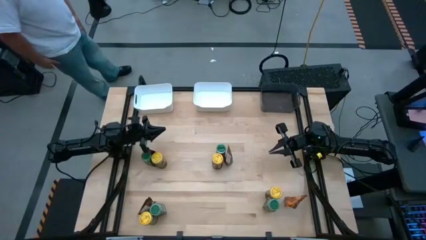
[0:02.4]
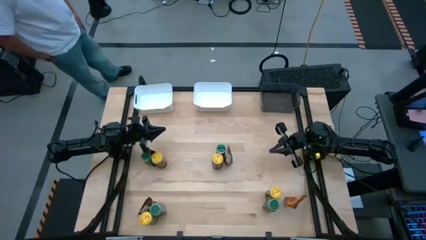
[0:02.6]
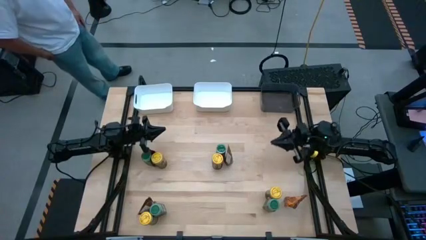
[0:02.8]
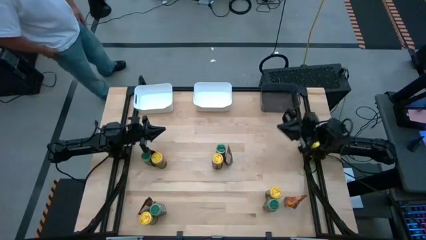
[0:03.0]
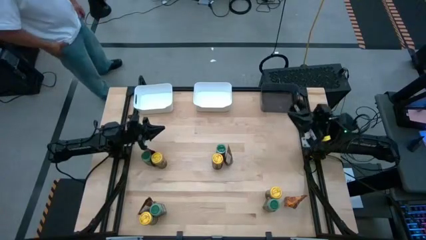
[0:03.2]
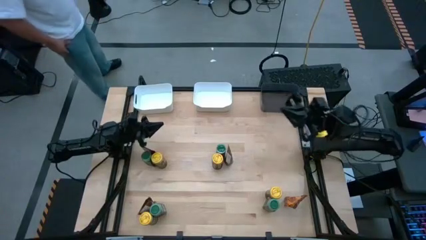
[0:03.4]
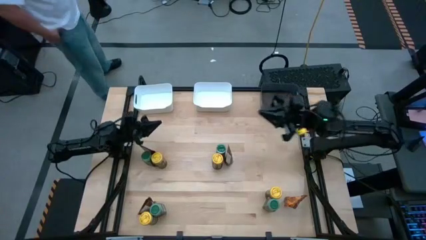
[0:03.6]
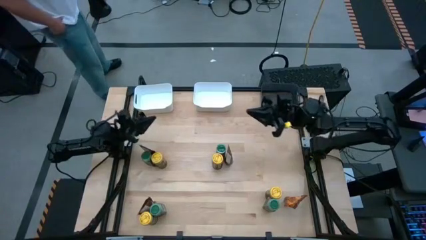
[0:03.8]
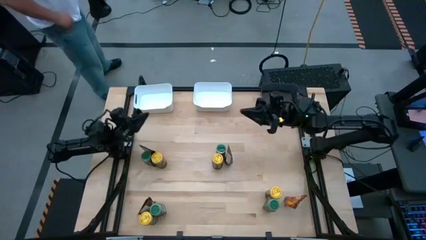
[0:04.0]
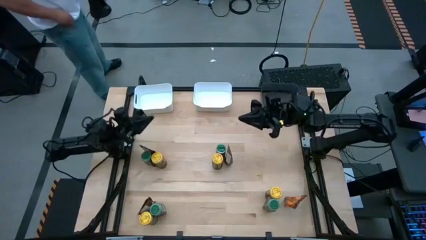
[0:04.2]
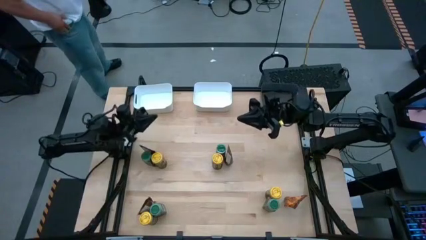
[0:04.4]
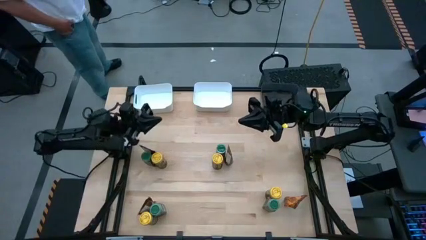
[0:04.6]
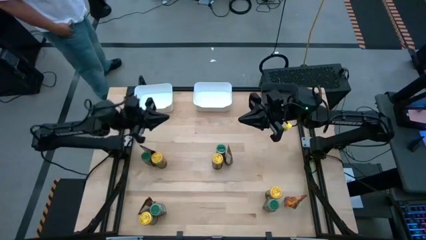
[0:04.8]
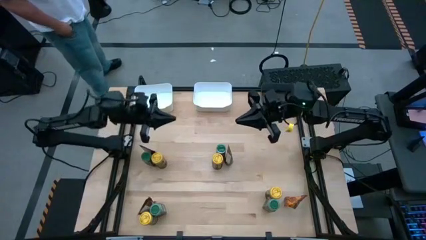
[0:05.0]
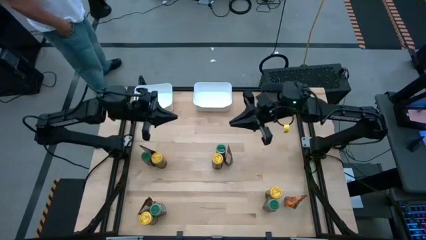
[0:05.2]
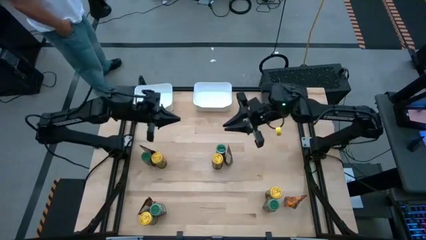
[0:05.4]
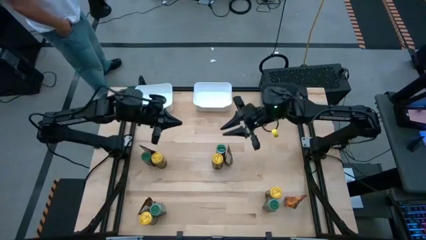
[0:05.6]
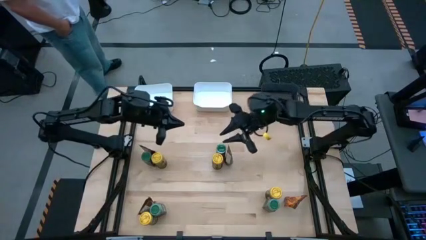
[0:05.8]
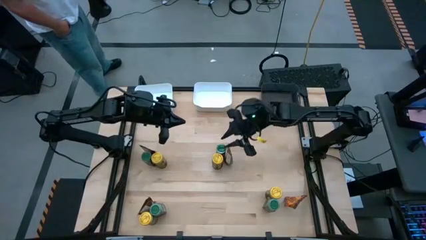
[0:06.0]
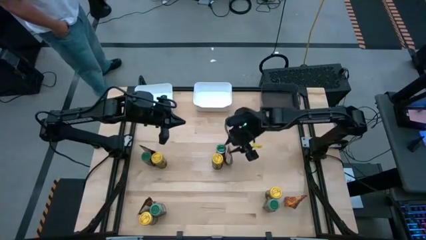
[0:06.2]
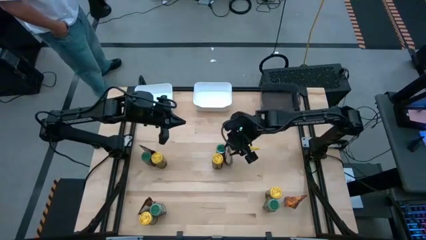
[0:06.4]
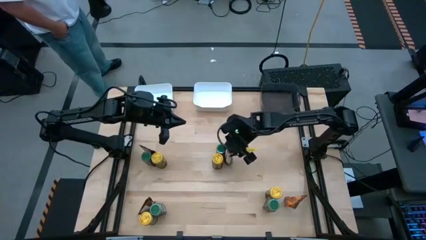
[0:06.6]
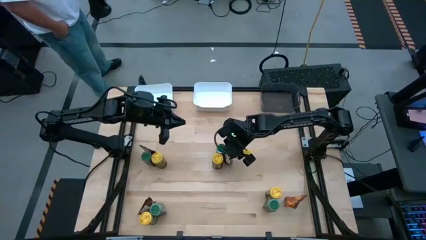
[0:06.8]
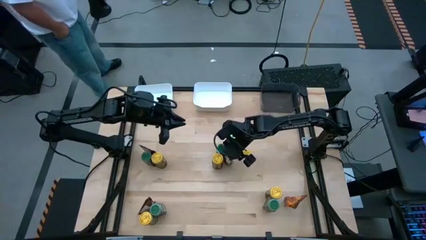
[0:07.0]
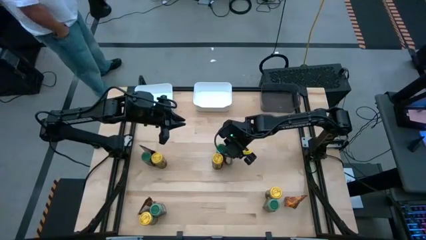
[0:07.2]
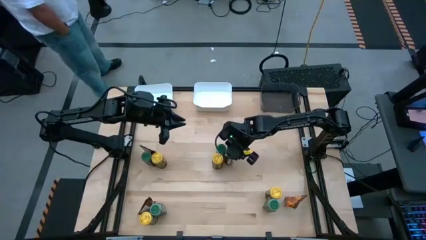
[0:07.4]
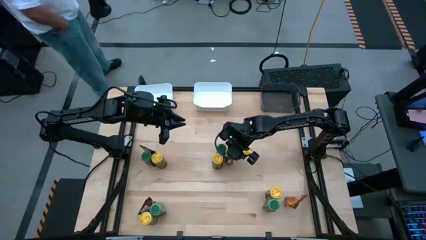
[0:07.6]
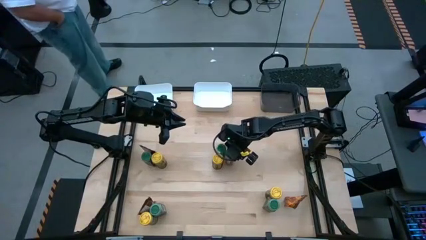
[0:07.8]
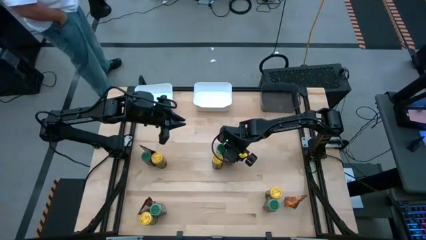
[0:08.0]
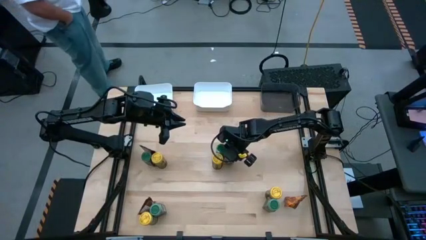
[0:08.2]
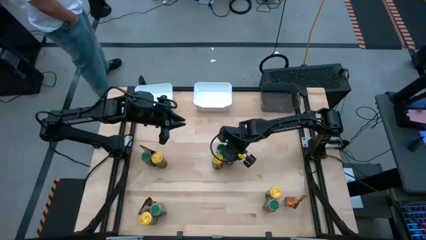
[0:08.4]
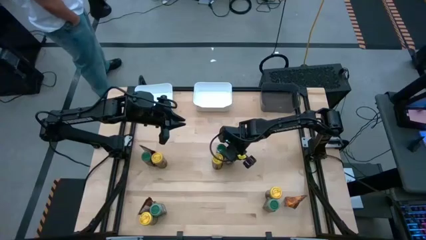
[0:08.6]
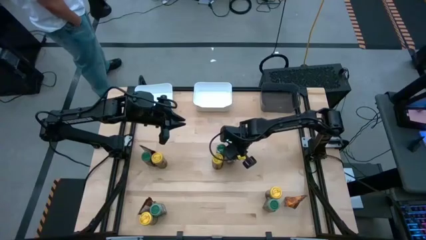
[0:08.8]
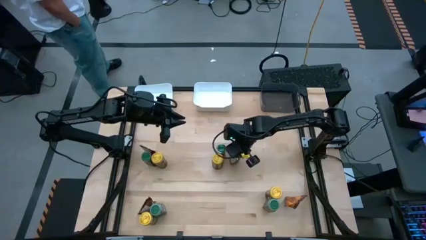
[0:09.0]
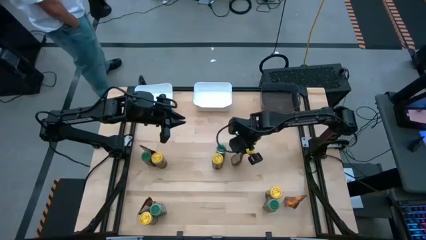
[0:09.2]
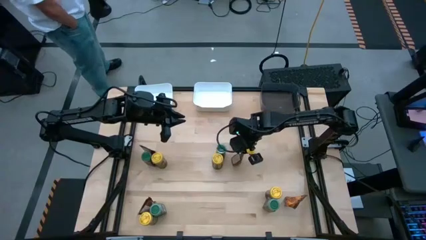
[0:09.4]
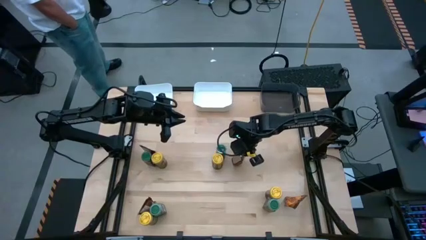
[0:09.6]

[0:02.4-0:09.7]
Task: Sort spices by type
Put the top right orange seasoning bag into the black bin

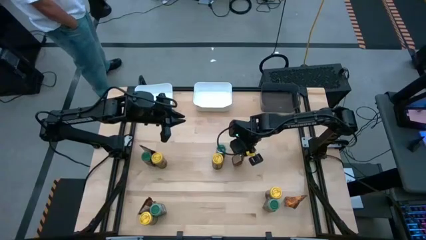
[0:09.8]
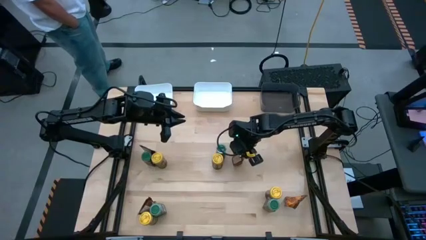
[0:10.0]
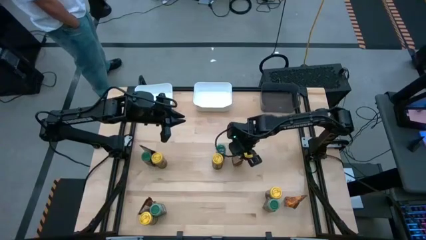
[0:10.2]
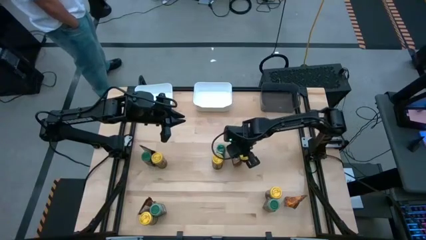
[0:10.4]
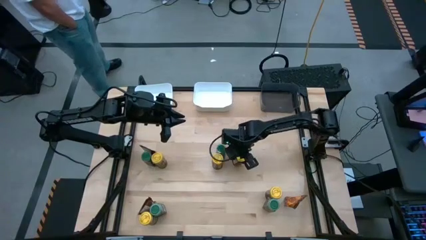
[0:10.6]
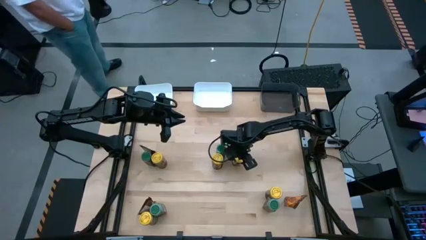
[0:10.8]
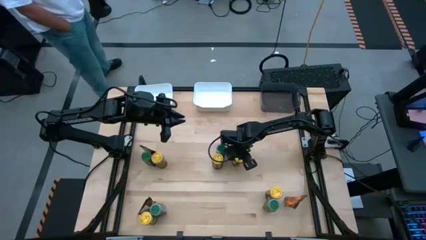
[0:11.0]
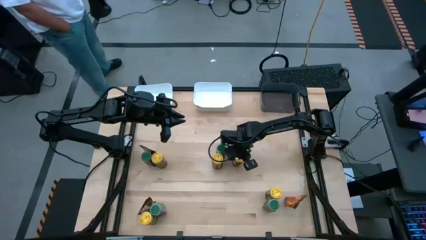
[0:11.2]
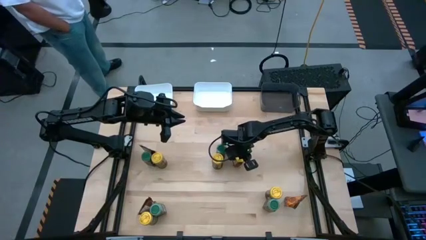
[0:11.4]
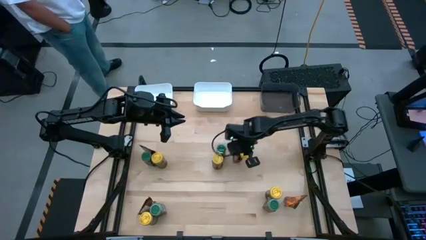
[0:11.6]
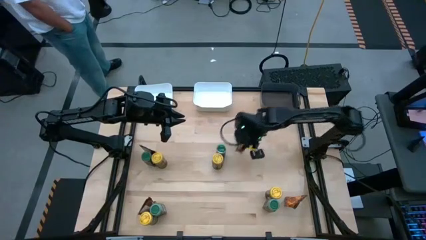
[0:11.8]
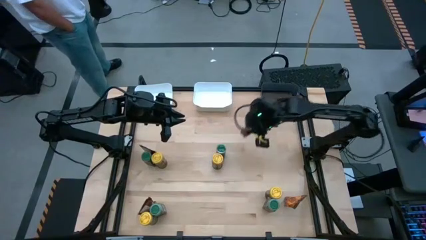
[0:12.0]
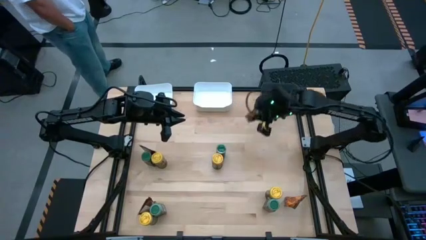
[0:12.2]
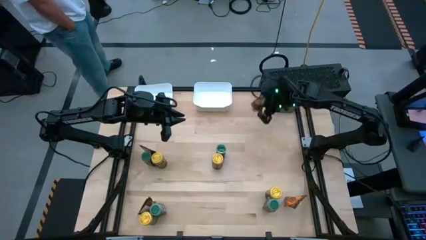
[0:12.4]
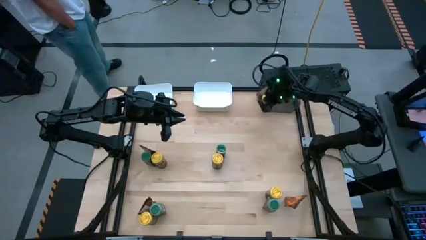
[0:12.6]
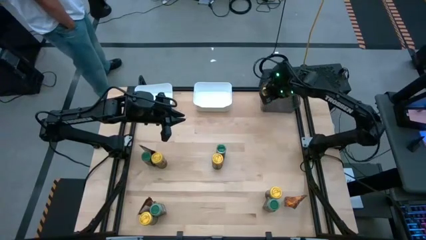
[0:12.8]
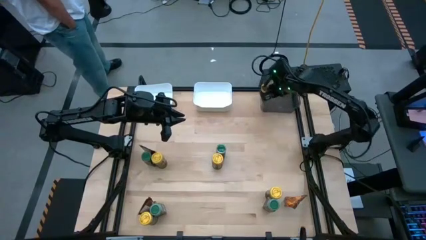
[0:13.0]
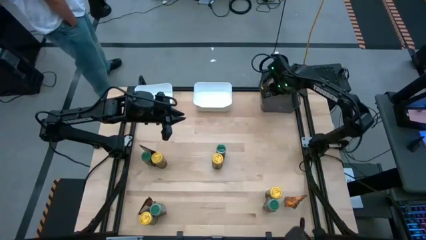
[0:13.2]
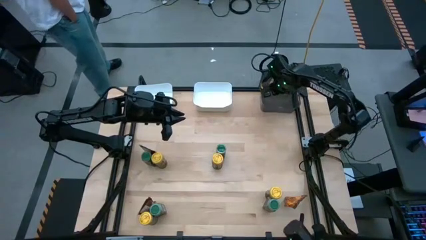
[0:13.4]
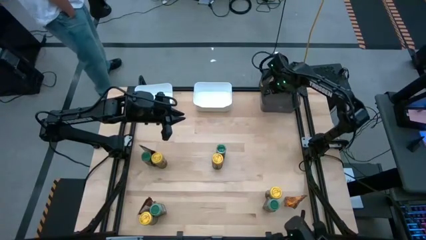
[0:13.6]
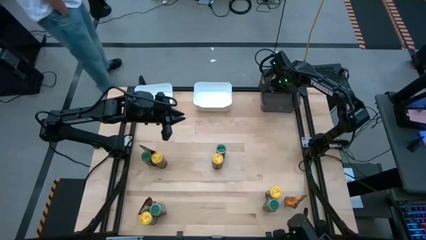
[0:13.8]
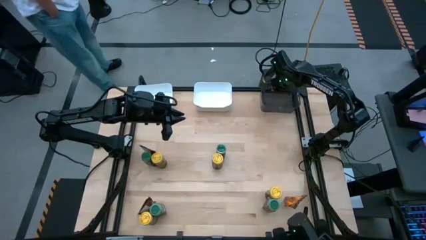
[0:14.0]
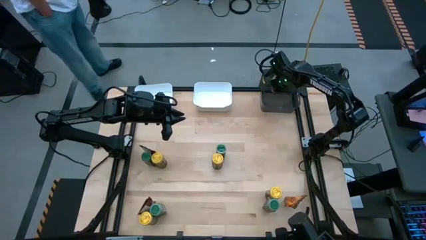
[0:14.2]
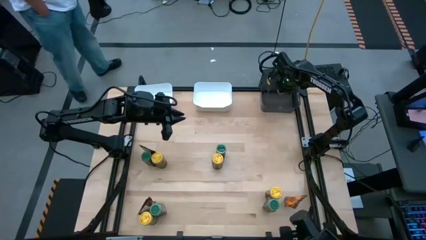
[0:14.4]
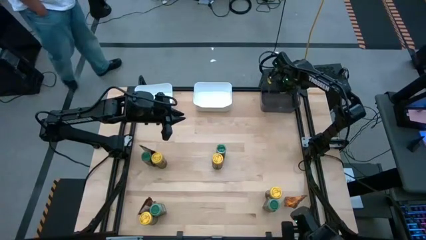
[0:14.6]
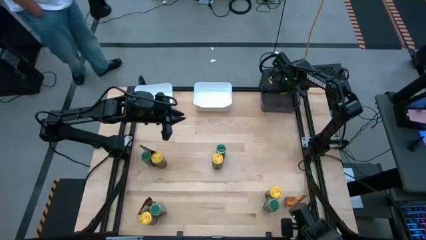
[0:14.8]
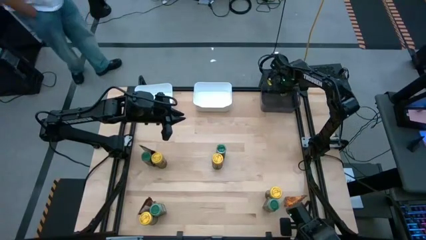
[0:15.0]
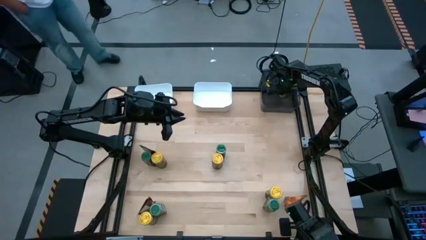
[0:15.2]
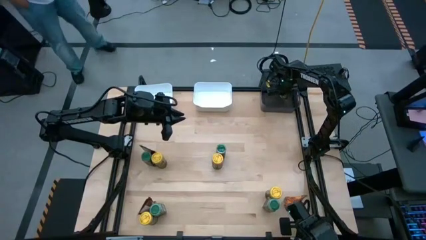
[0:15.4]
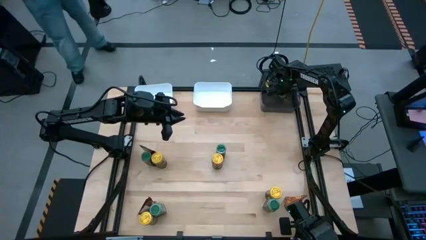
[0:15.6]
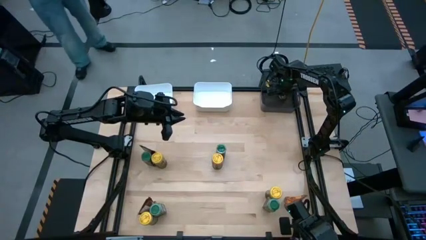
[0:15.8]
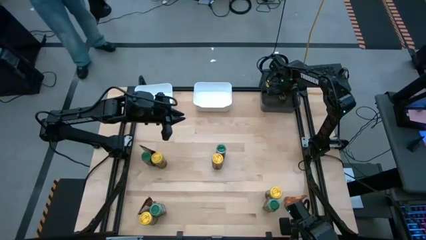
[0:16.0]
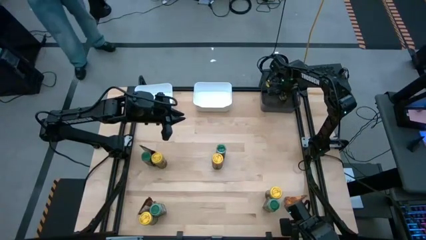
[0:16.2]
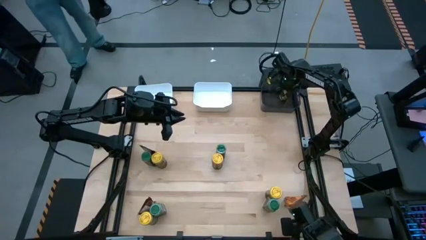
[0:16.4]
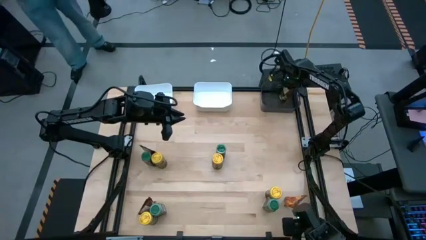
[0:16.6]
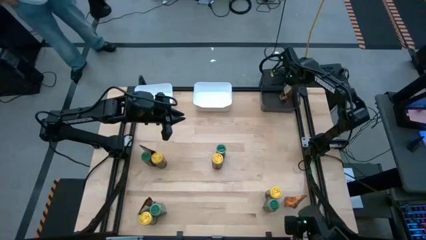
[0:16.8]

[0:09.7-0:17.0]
Put the top right orange seasoning bag into the black bin

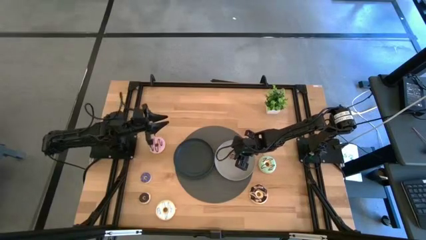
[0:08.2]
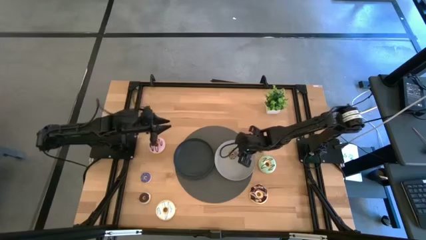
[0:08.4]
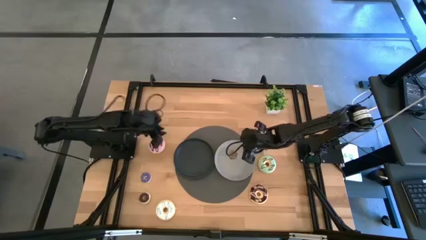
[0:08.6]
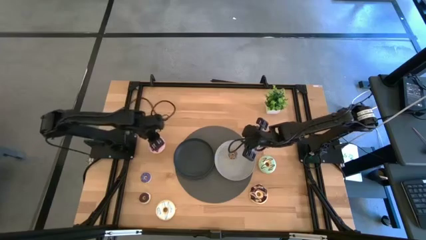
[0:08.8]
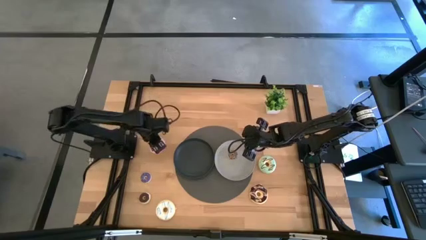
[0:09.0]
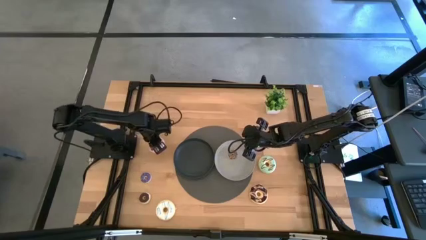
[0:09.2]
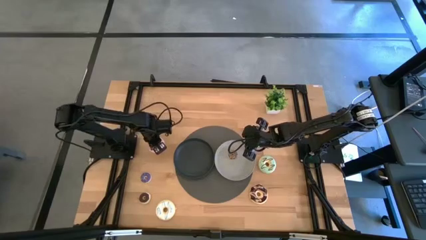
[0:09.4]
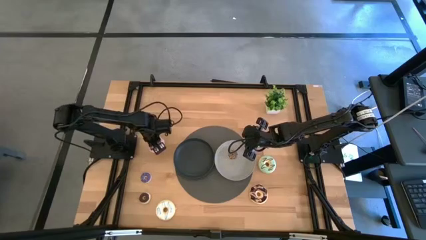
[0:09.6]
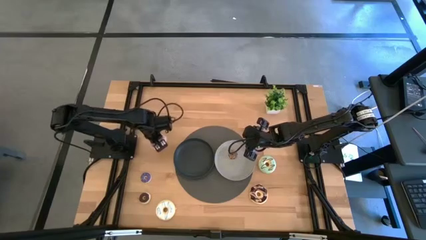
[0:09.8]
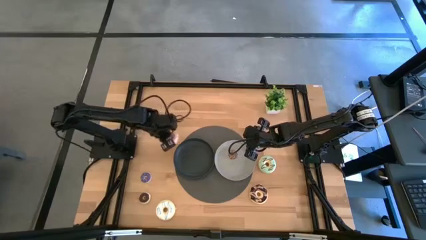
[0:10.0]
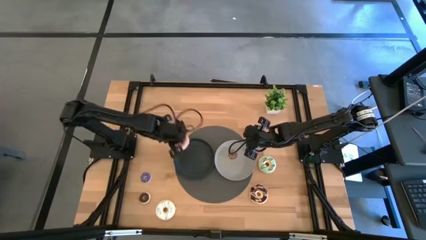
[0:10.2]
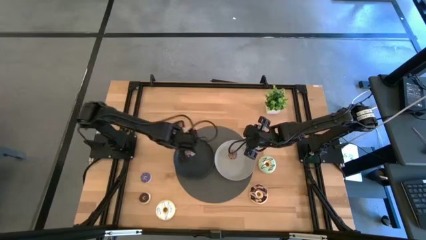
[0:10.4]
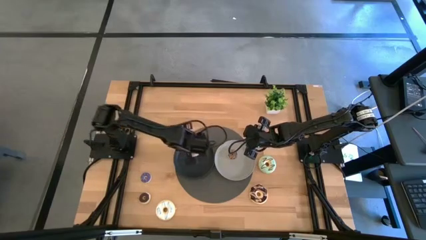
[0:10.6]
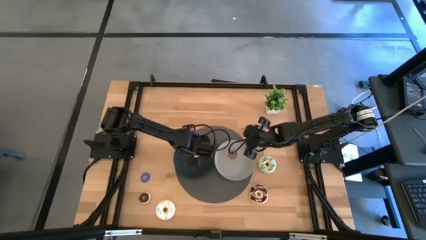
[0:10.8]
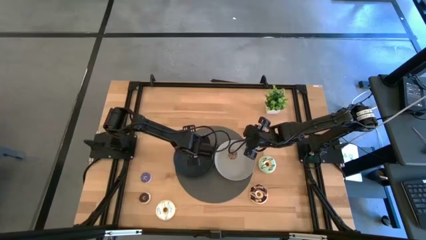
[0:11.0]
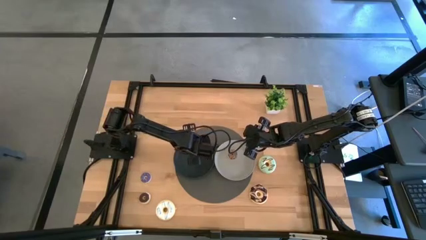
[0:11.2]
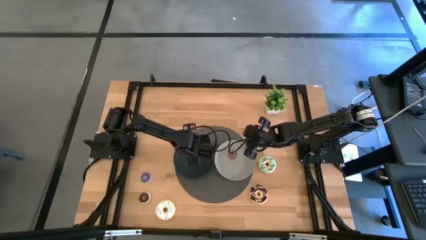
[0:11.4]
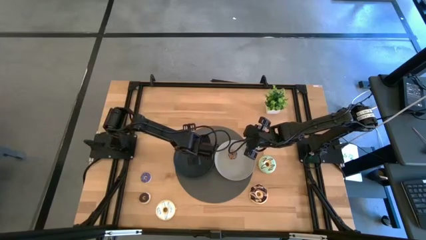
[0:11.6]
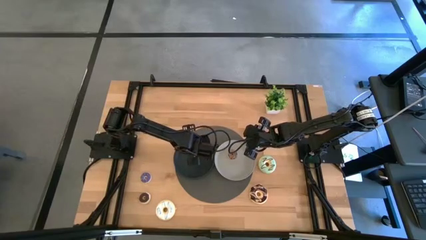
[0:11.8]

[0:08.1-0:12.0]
Task: Pick & Place donuts
Put the big purple donut on the black plate
